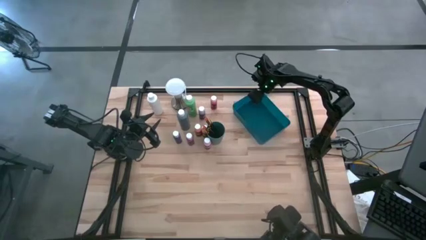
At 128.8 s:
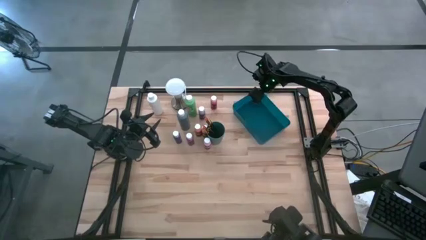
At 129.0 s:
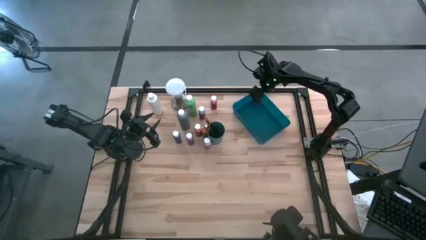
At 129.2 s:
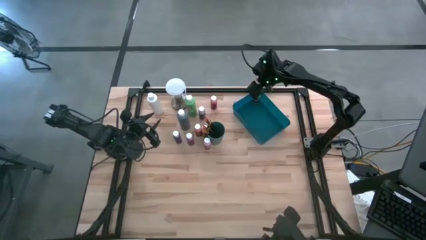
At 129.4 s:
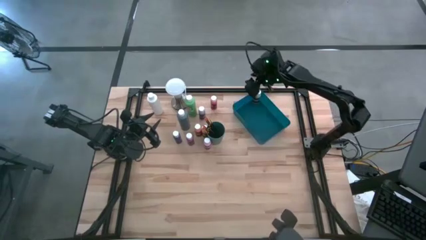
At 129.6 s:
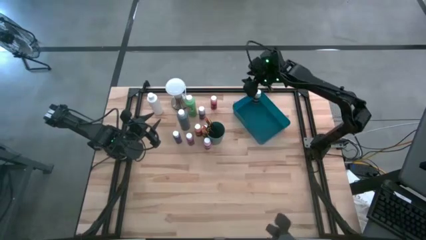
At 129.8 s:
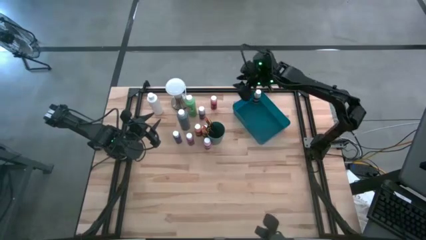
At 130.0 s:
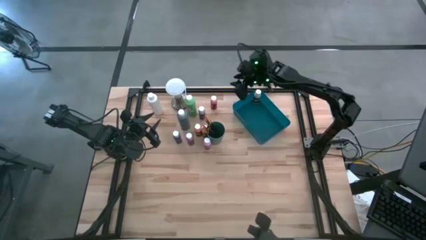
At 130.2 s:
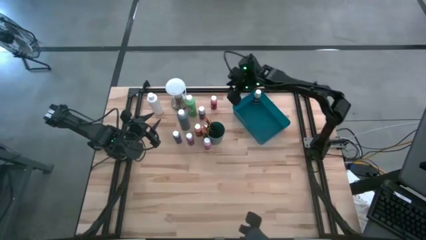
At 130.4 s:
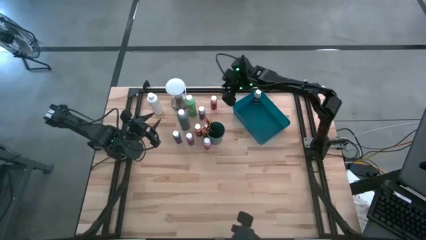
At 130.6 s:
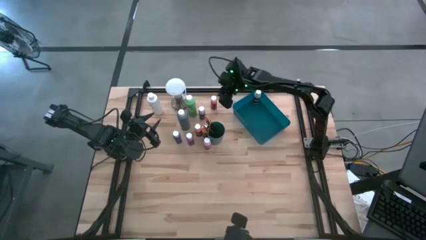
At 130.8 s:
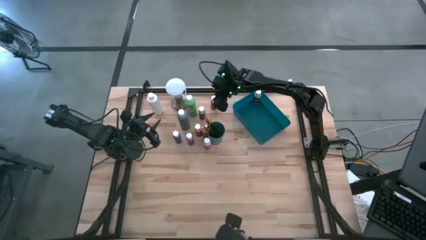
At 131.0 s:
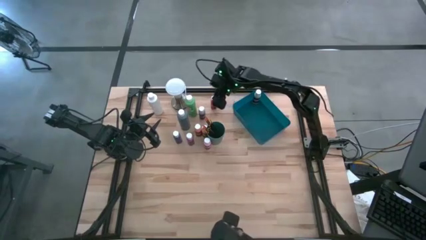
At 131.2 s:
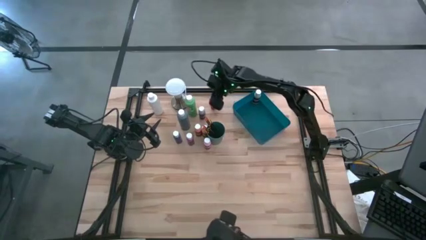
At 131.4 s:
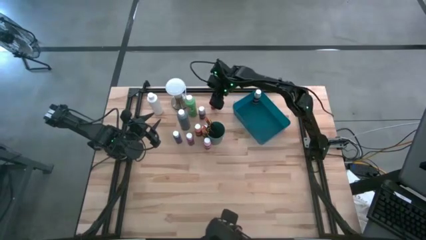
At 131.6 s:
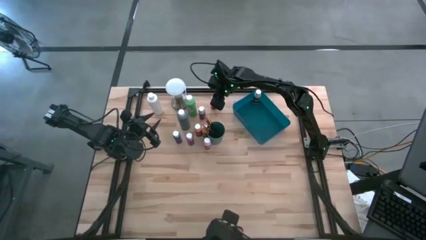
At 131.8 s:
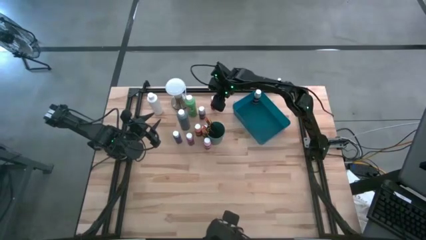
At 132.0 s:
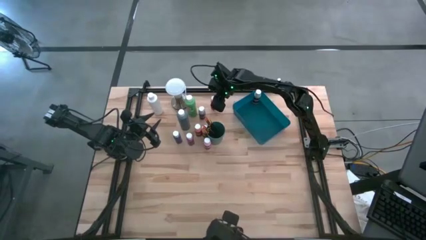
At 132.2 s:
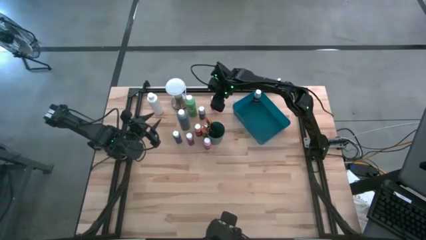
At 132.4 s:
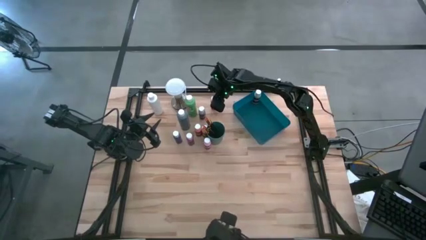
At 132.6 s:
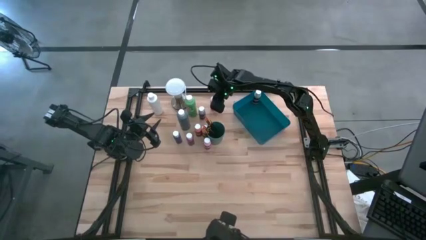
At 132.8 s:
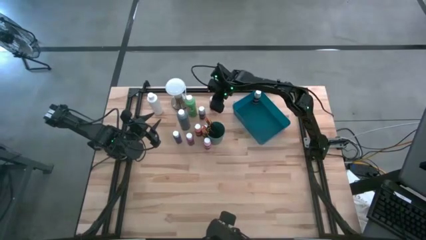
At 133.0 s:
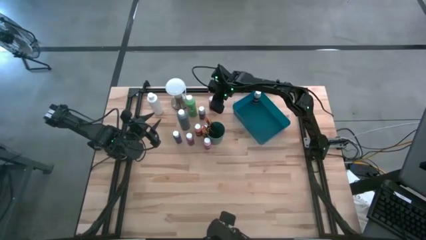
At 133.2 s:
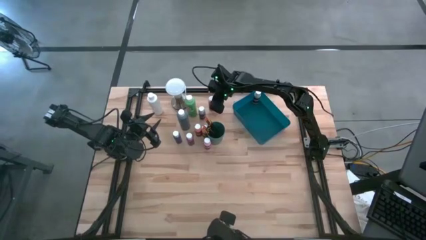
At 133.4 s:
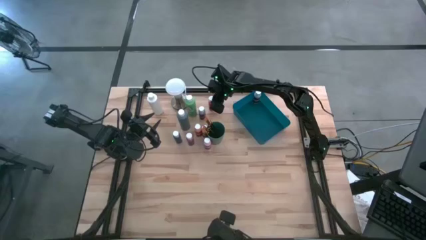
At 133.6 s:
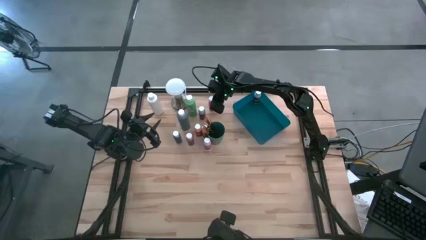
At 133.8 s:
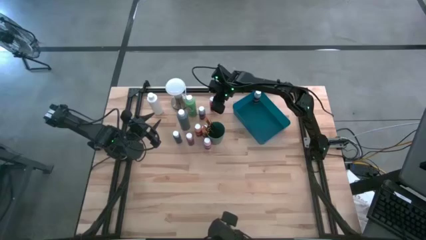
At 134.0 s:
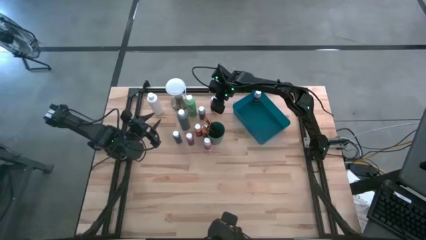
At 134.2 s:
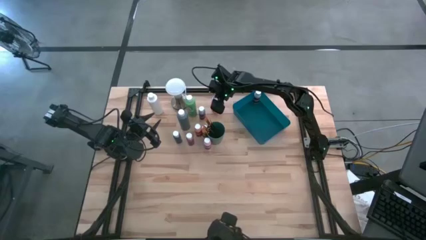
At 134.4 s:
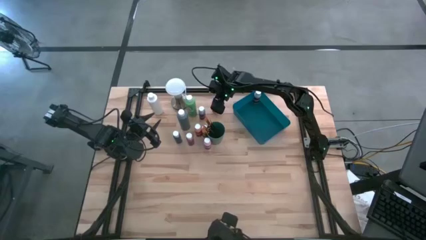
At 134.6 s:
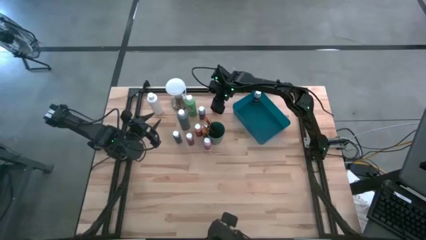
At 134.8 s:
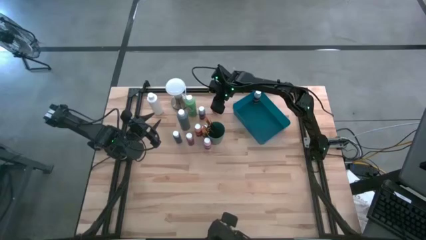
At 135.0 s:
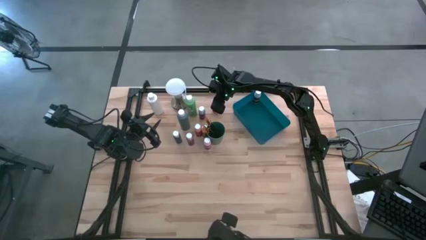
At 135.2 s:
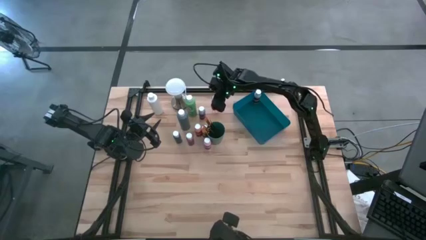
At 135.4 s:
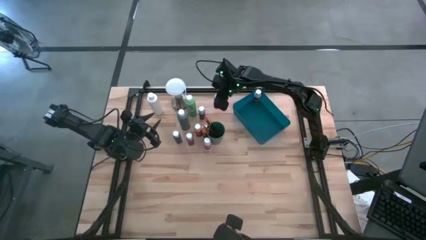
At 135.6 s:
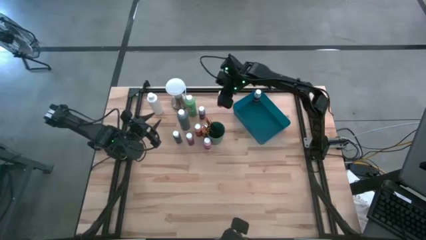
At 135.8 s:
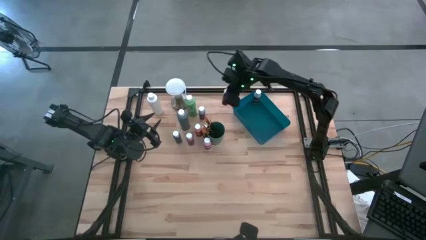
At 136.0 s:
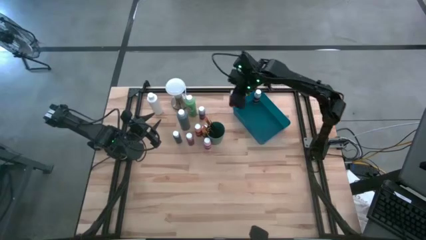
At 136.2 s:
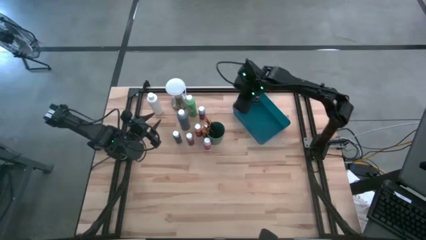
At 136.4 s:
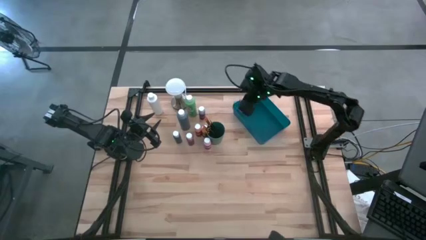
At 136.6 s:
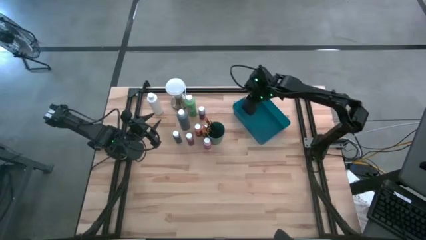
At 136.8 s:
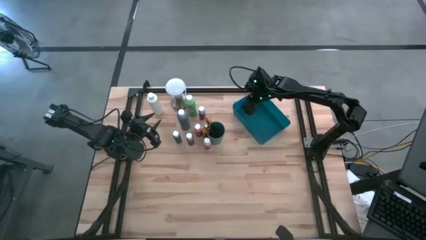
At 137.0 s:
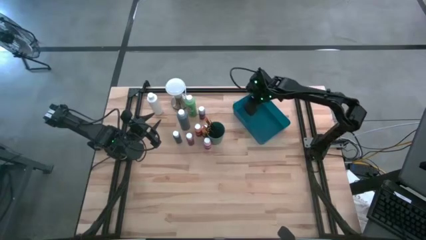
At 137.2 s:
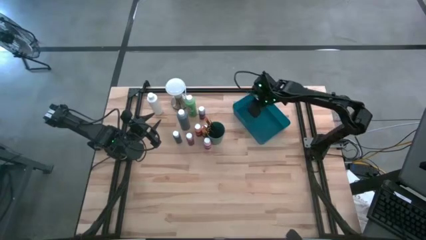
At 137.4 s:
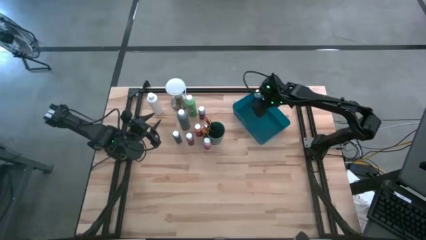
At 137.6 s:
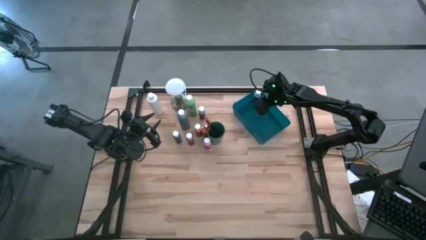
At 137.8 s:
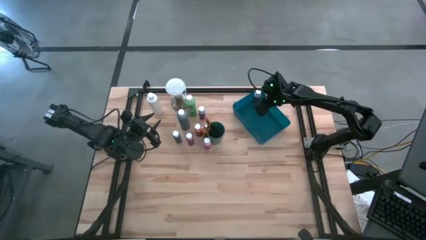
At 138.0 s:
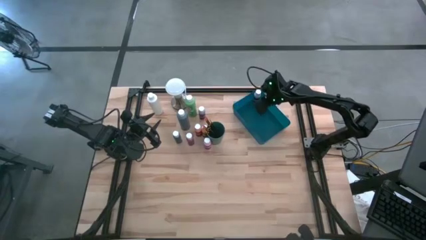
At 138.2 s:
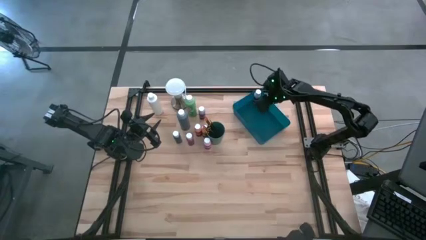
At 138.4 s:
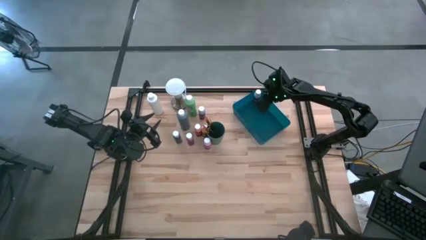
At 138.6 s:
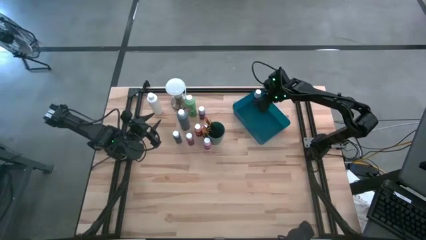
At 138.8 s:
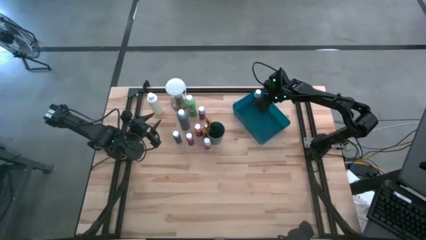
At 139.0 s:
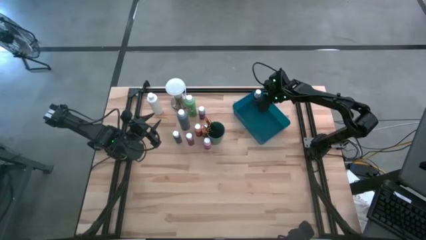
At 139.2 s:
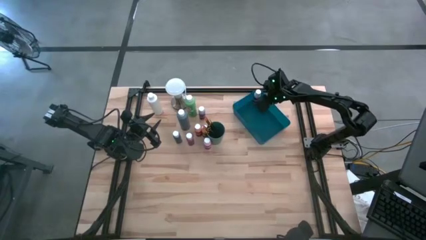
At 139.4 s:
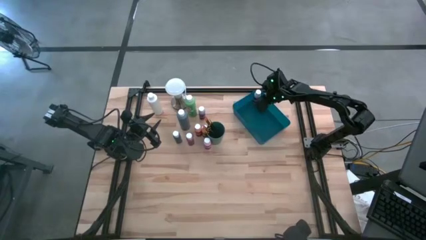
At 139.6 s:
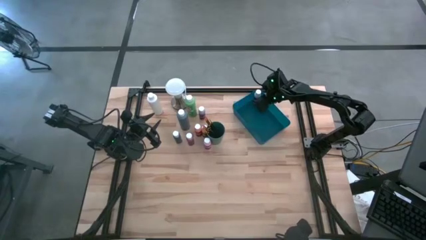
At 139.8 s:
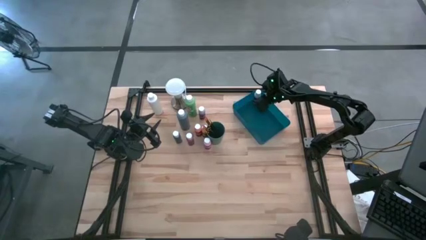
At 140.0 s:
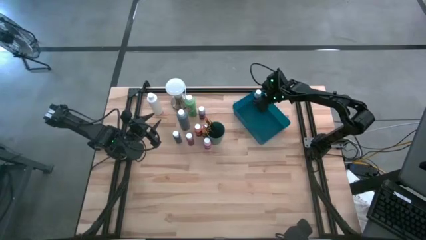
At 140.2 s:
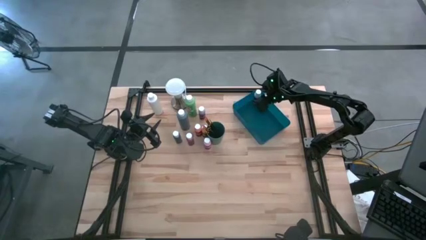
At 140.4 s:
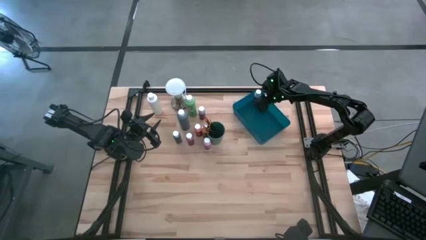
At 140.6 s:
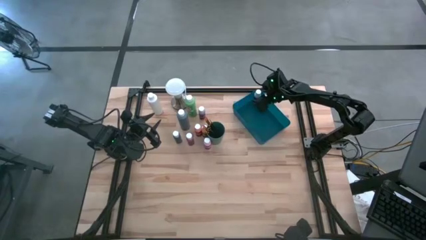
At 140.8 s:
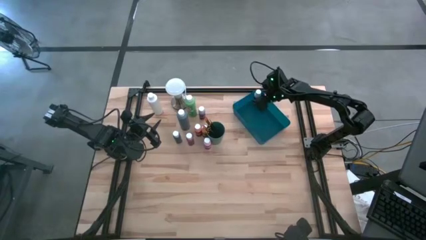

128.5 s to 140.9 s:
Task: Pick & Place Paint Supplies
Put the light orange paint bottle into blue bin
